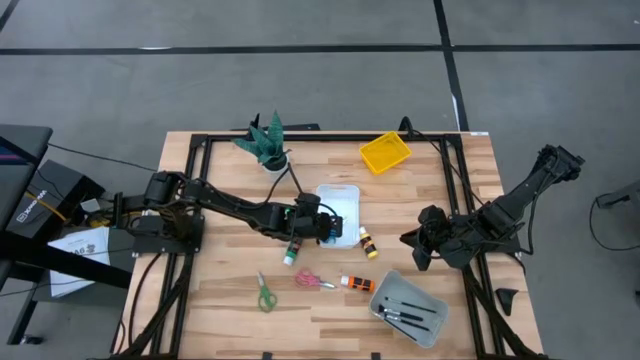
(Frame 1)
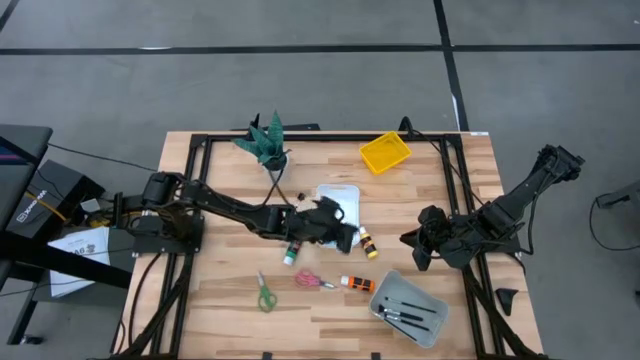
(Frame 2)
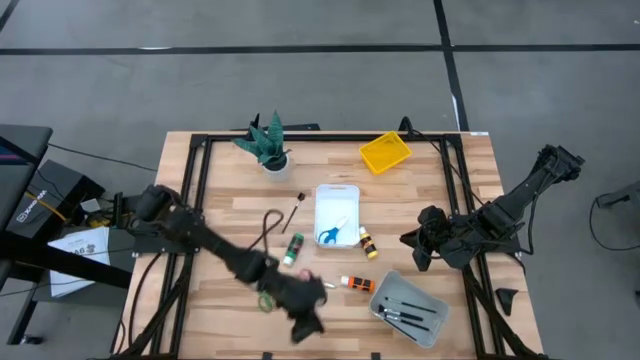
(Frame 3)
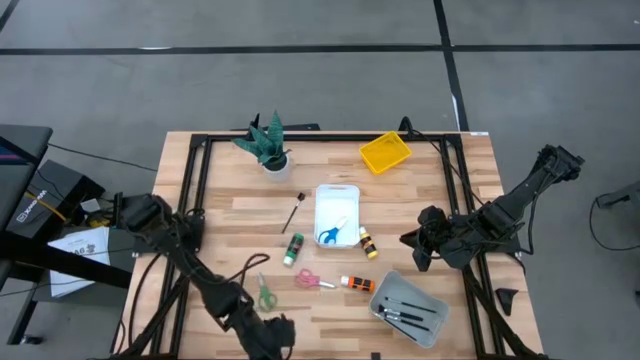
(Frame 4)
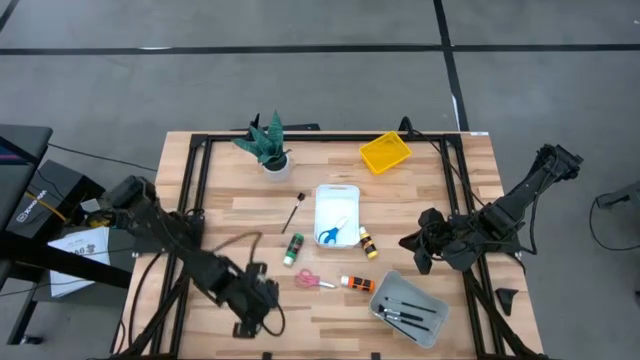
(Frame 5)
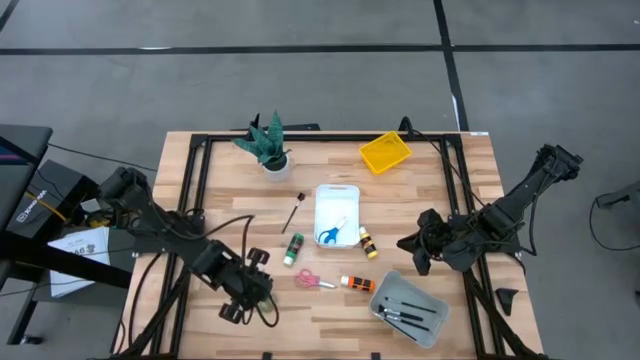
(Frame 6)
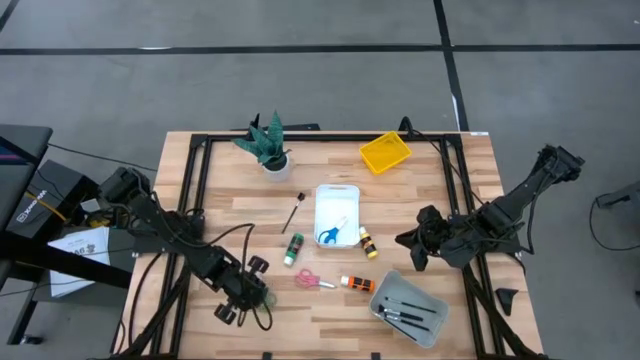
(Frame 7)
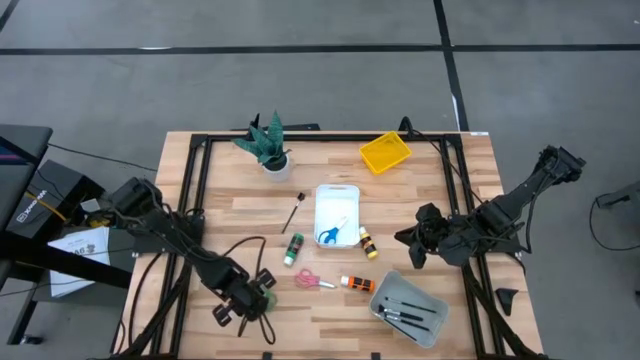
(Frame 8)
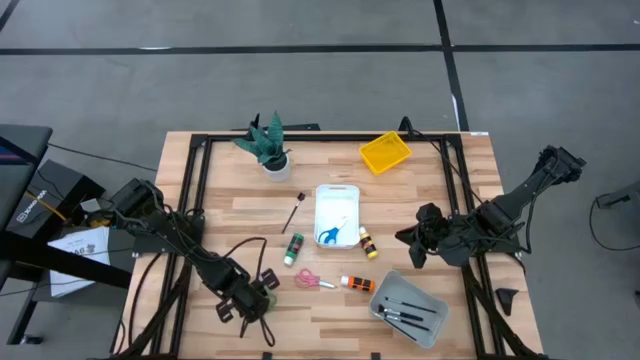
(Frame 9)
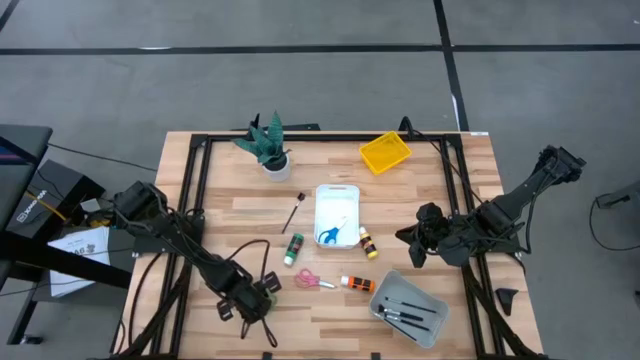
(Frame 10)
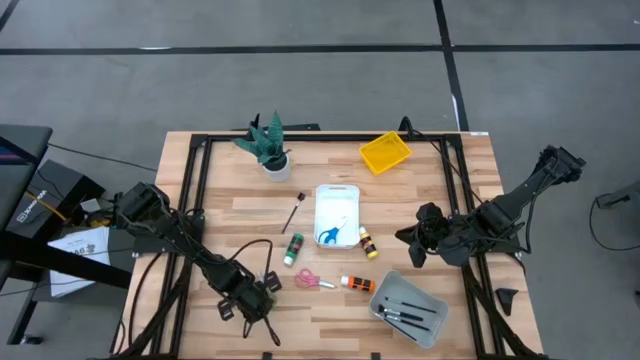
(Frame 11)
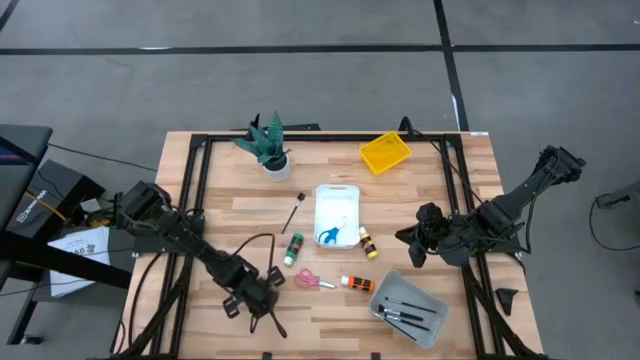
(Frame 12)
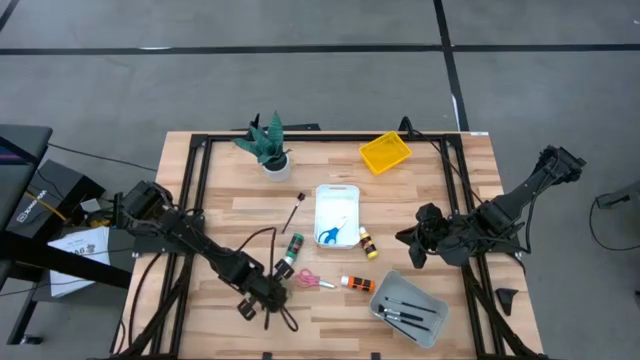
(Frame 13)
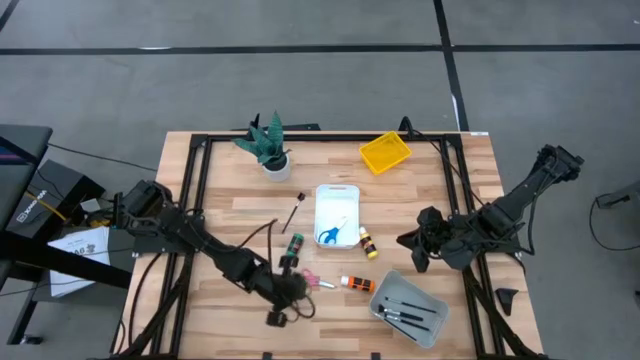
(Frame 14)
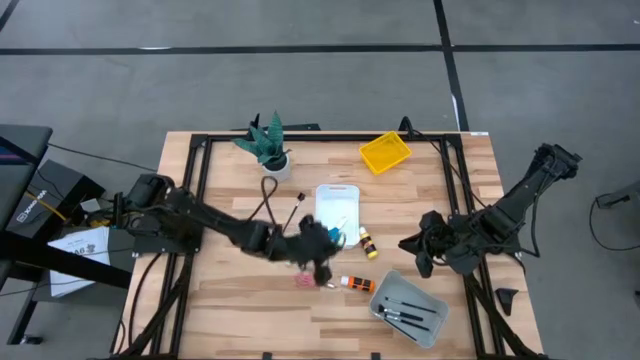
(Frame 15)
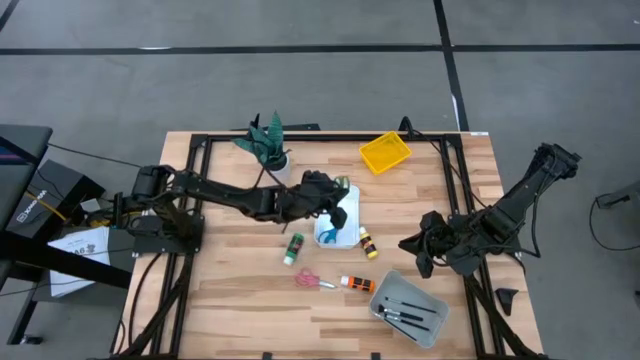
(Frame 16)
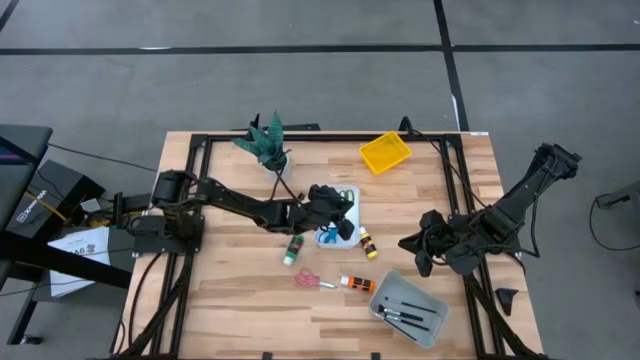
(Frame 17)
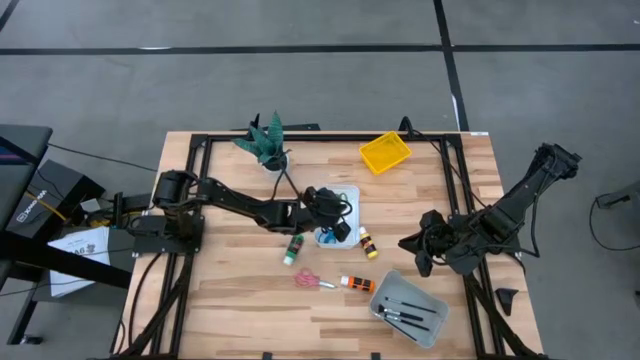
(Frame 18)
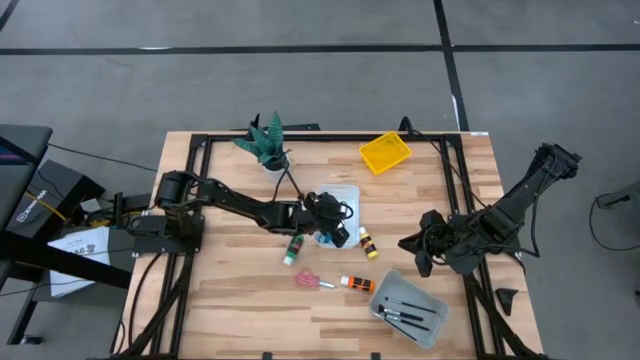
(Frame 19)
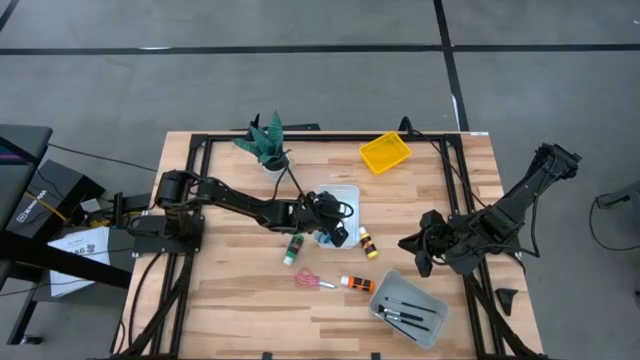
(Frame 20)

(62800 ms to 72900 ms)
Task: Pick & Place Paint Supplies
Put the green scissors into the white bin

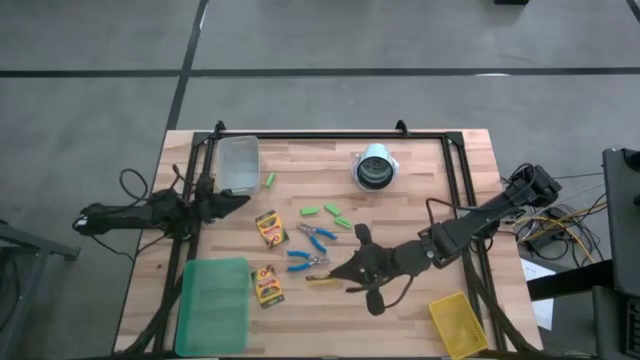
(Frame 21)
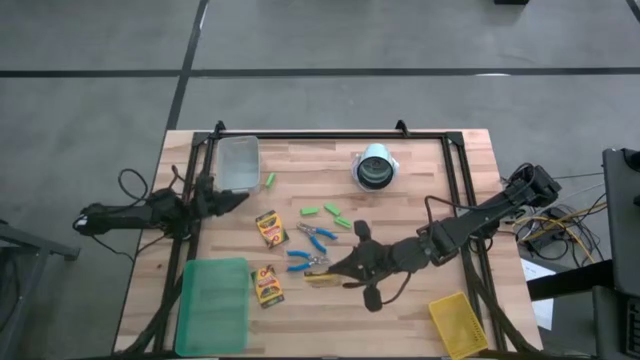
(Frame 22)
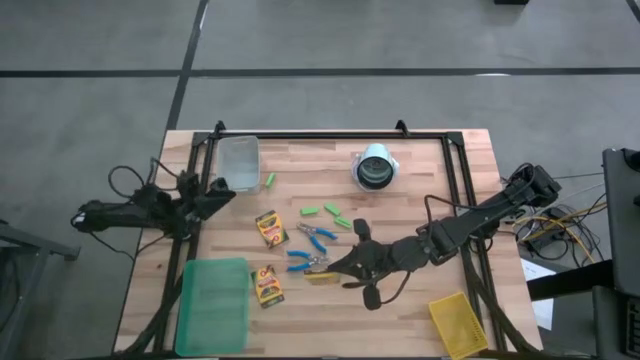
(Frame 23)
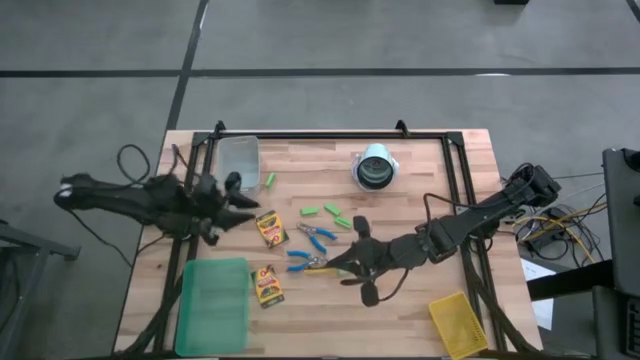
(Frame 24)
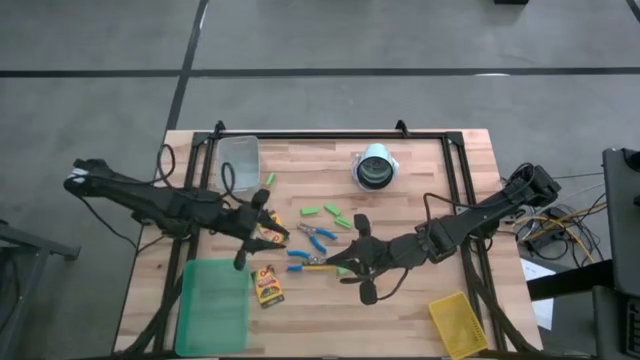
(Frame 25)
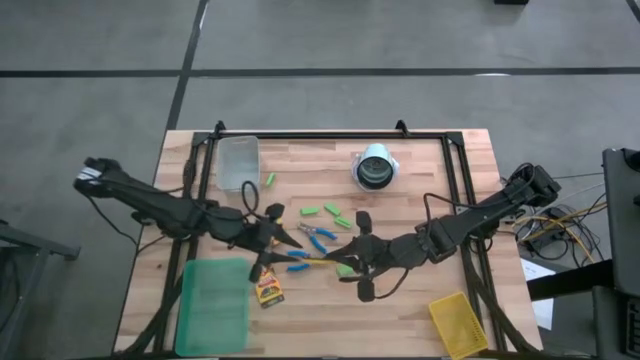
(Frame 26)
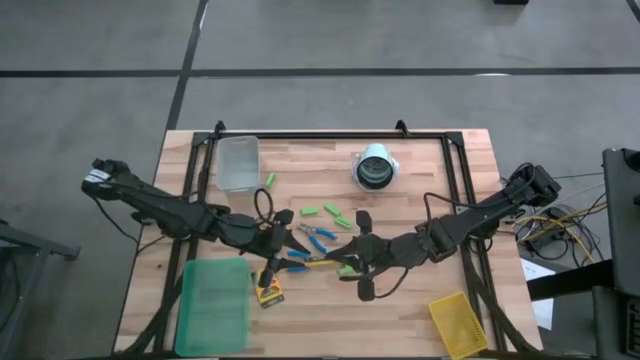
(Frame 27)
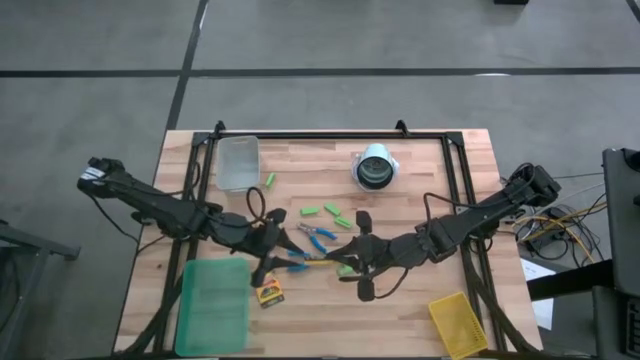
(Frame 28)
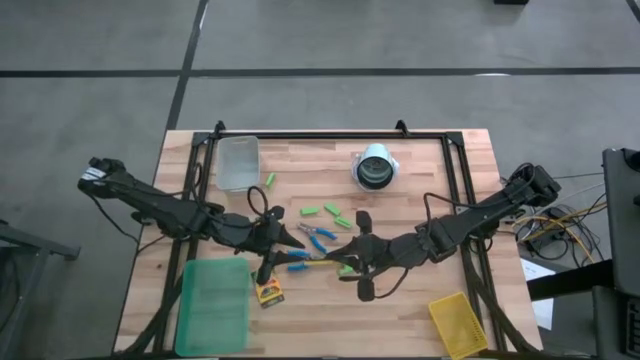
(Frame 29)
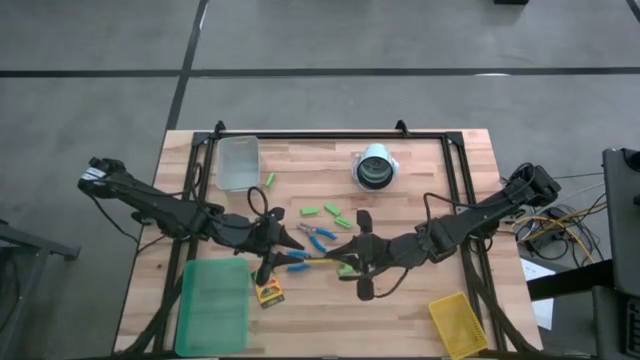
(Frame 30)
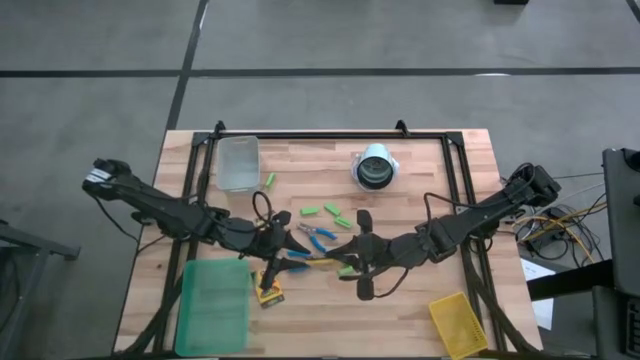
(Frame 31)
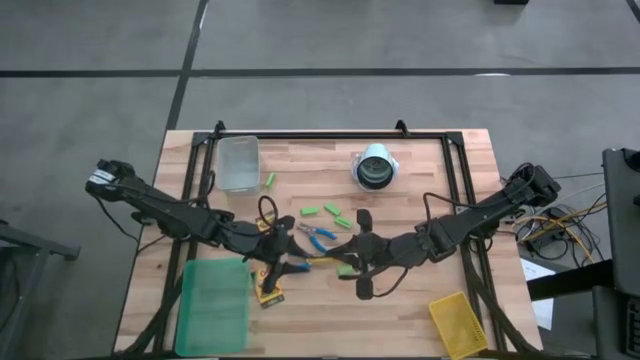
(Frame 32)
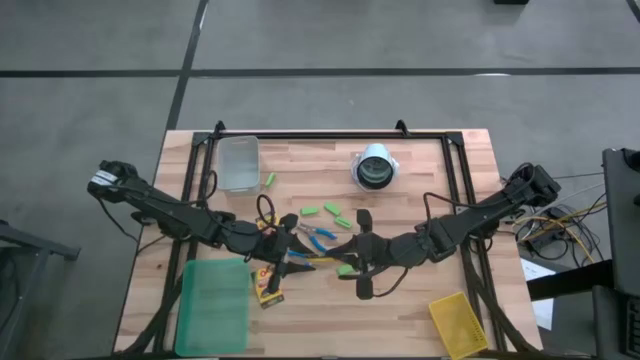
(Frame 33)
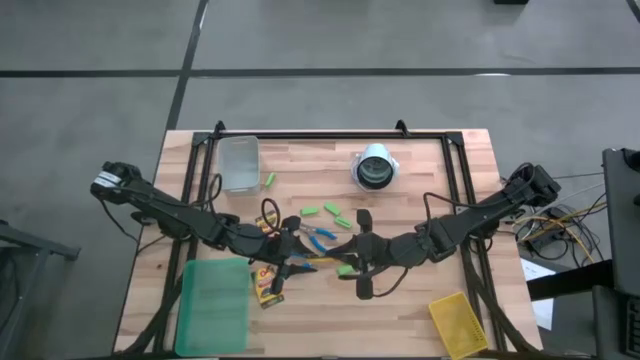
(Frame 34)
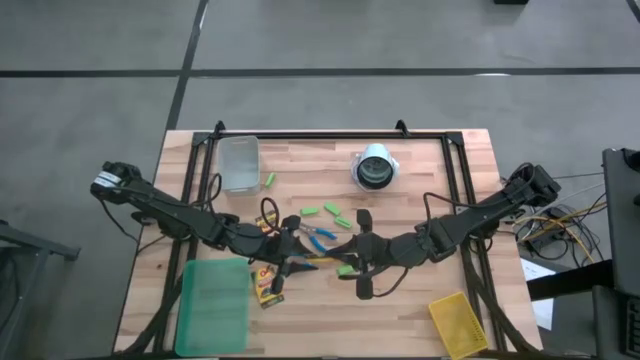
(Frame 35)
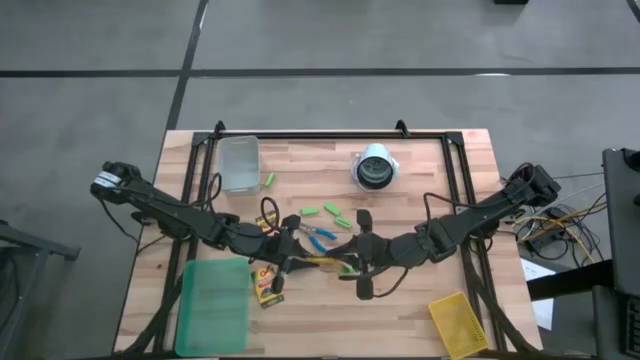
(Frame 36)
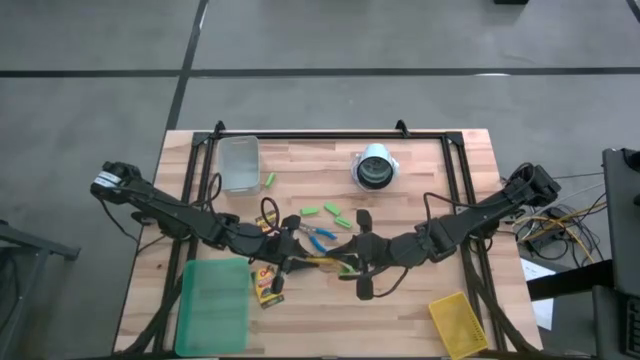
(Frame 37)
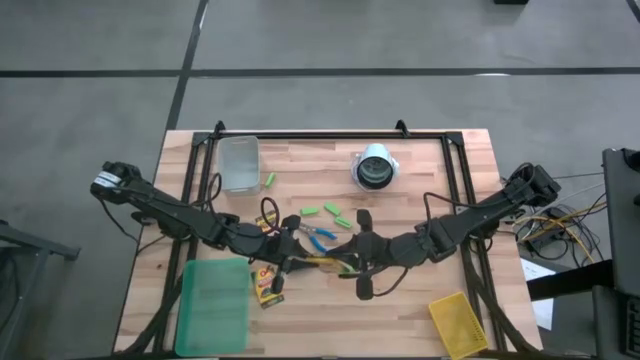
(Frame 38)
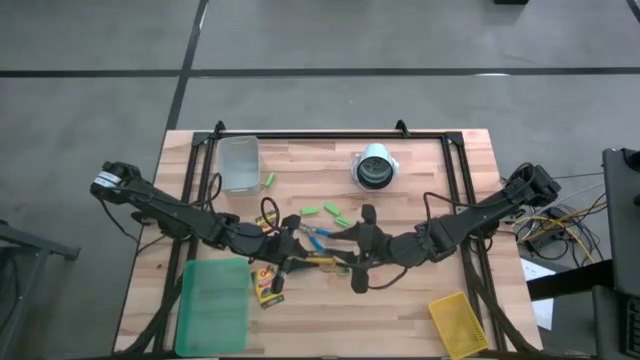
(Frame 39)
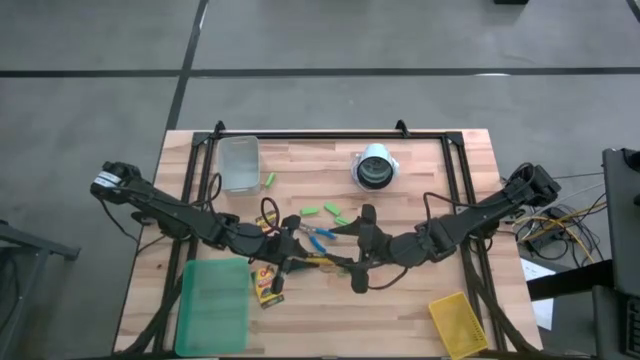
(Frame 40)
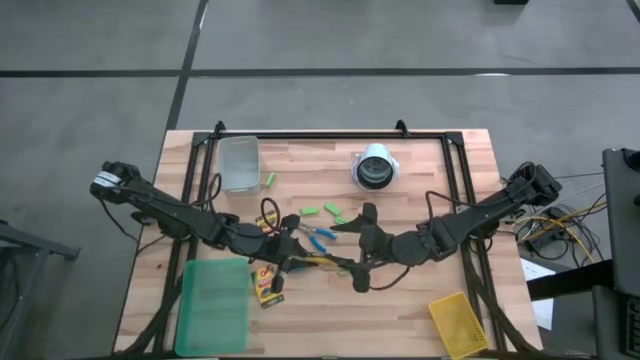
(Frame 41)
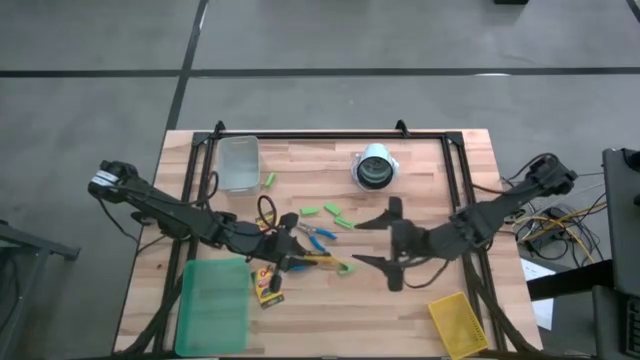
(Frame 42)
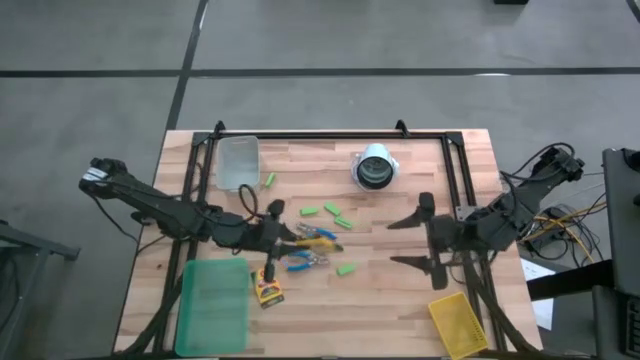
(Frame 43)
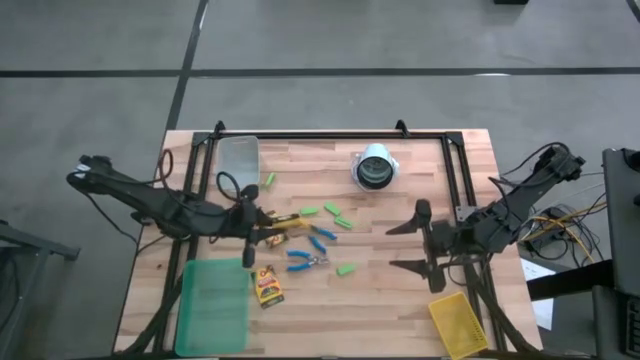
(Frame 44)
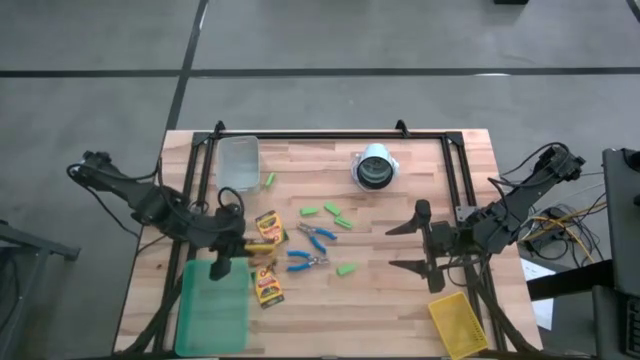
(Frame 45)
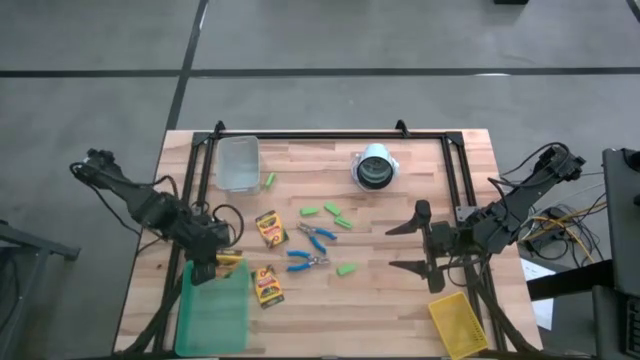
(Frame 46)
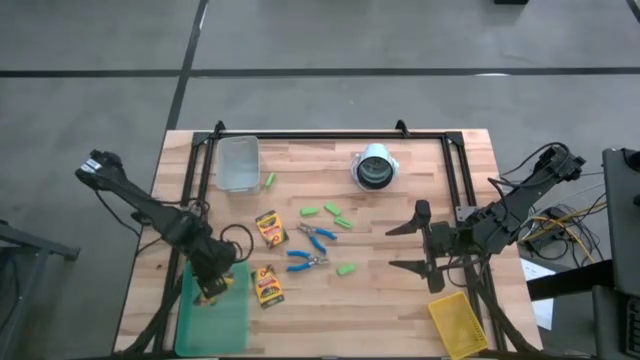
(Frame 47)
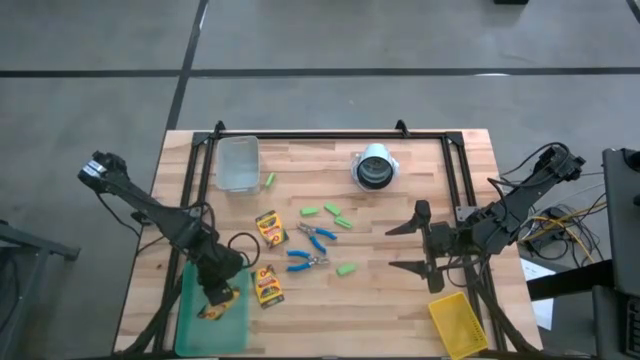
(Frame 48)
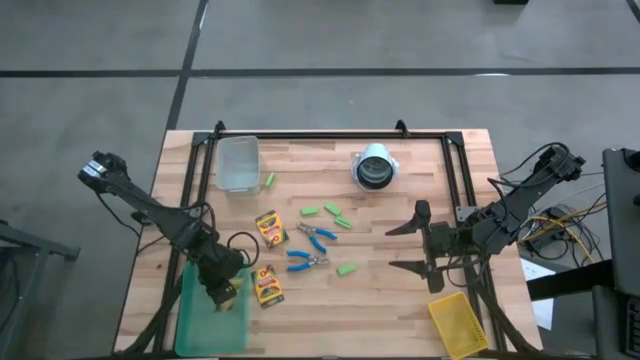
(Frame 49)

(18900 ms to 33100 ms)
Task: Pick & Place School Supplies
Put the yellow crayon box into the green bin
